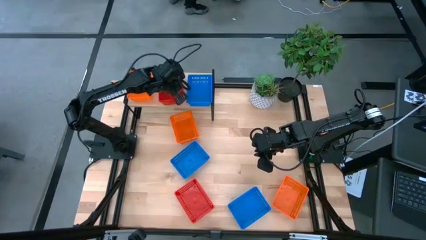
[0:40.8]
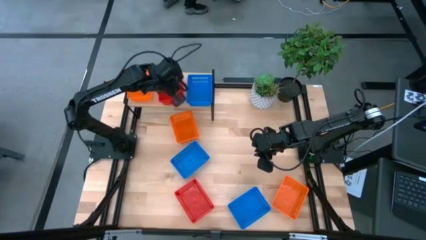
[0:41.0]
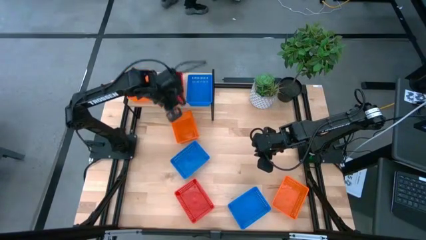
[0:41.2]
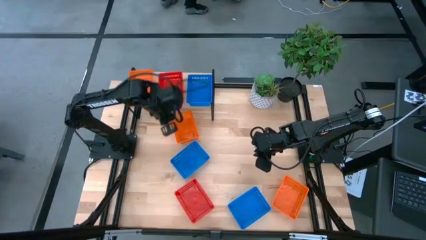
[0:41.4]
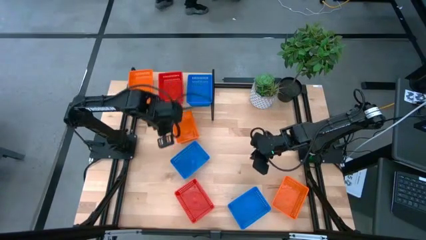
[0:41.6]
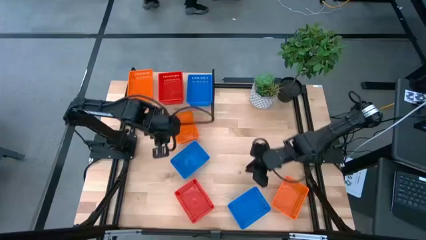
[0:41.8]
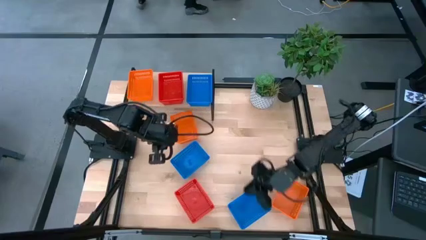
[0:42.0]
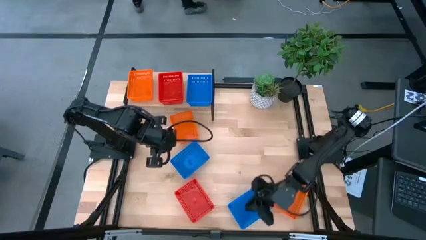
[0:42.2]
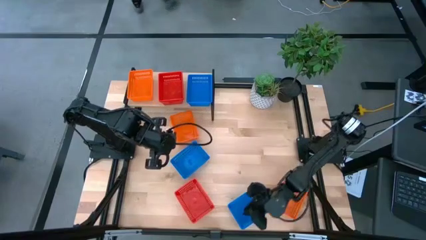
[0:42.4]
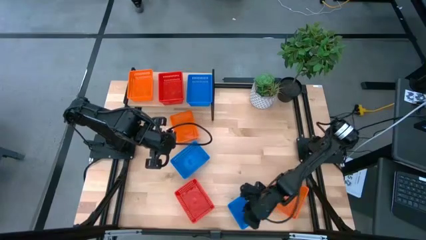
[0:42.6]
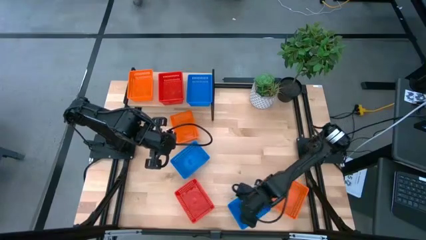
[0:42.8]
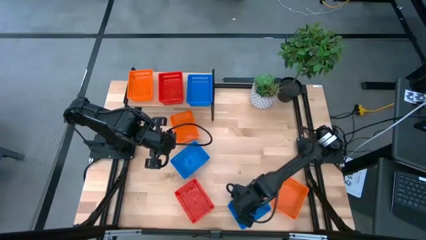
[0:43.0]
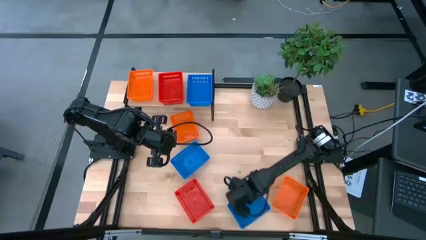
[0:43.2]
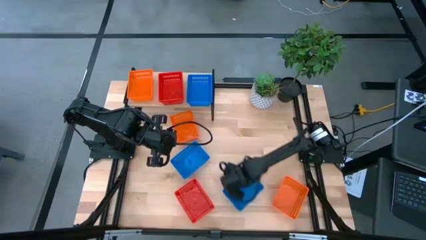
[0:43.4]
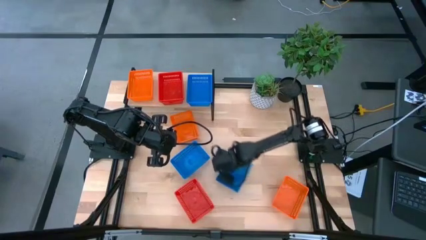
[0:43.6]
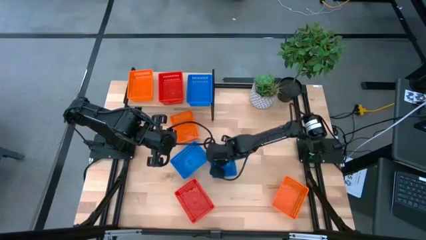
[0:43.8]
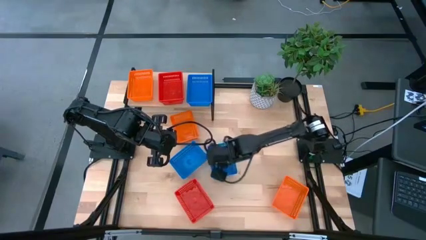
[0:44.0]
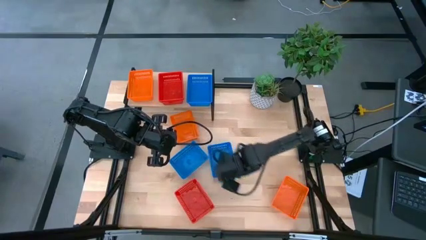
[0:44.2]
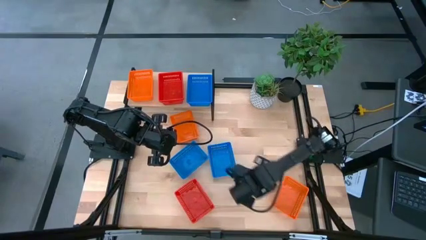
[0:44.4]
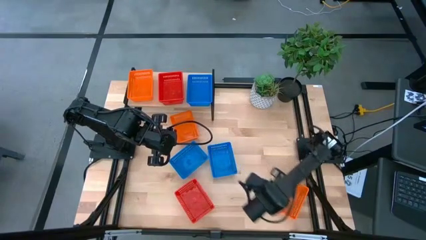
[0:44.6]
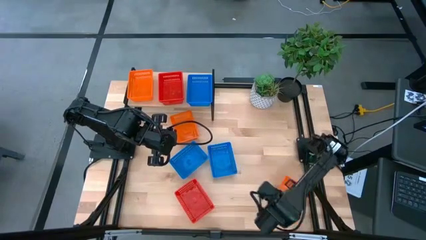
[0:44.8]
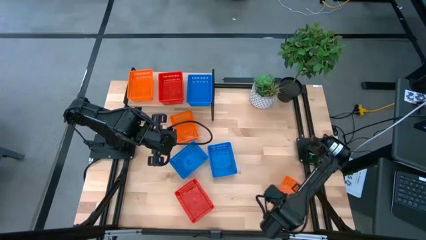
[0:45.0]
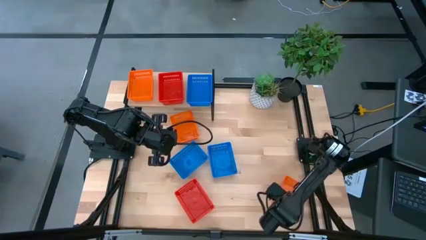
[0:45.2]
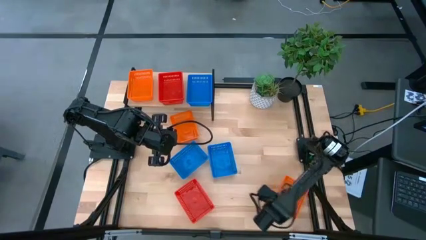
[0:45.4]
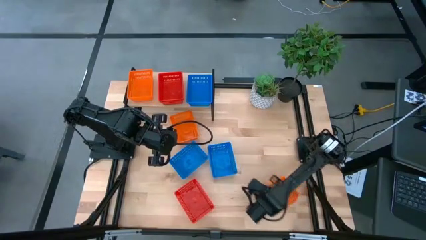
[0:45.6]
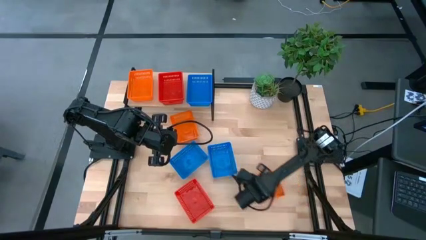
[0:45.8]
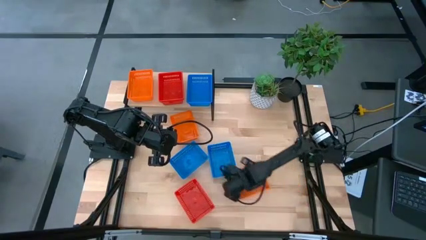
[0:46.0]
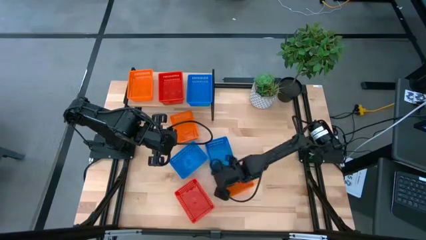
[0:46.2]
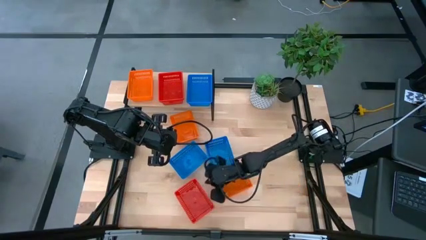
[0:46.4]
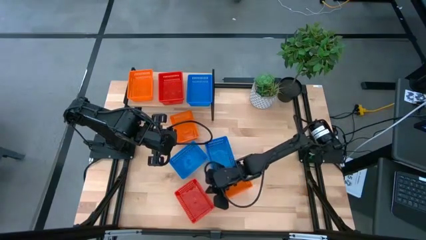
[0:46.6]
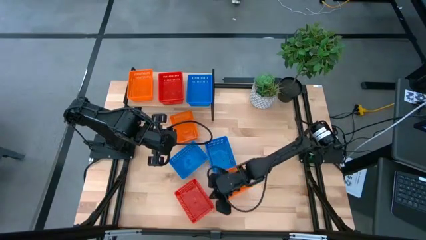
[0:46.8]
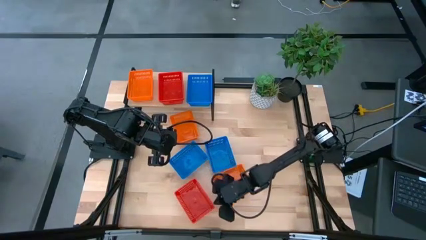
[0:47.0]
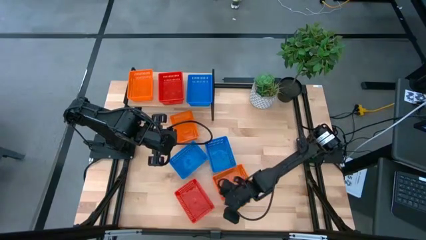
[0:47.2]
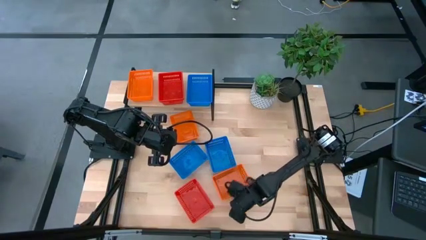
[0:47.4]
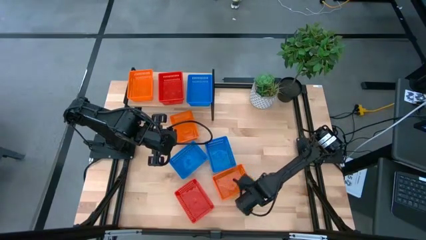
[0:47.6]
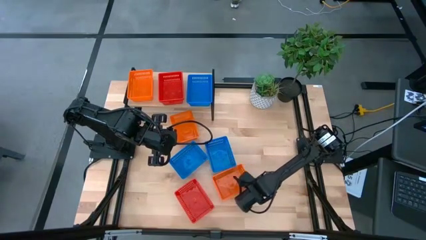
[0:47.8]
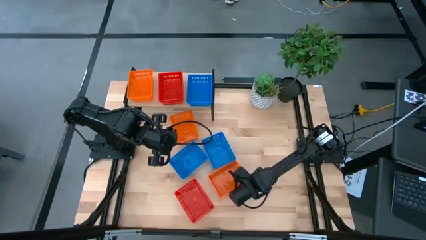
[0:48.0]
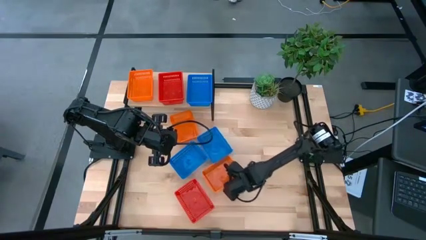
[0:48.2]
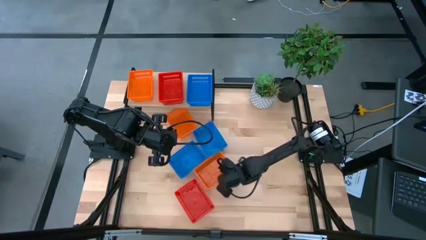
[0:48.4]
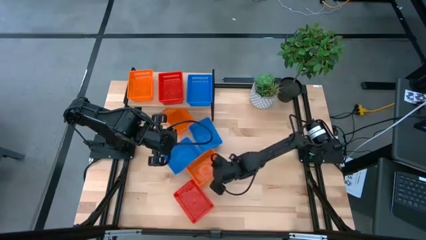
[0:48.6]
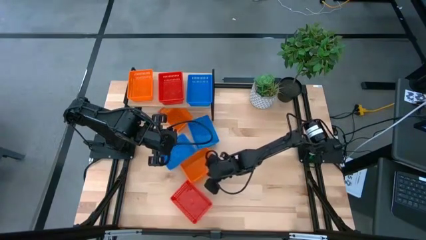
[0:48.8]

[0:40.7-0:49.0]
Task: Stack baskets on shelf by color
Move the bins to the center of the table

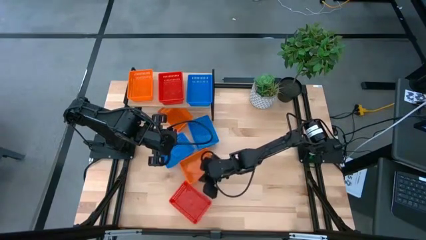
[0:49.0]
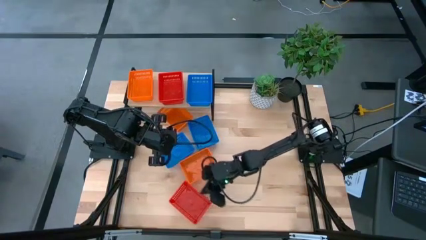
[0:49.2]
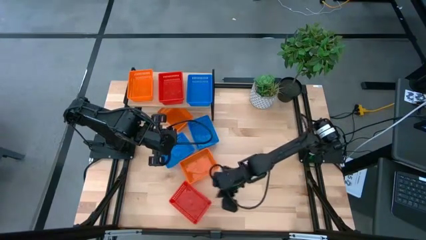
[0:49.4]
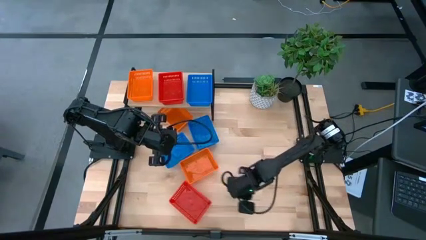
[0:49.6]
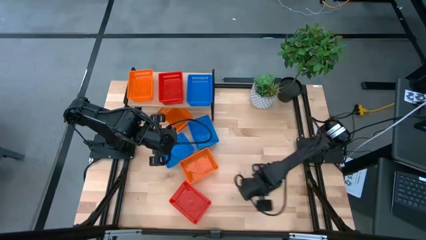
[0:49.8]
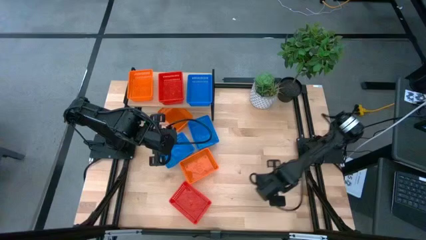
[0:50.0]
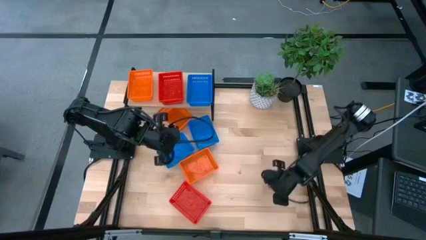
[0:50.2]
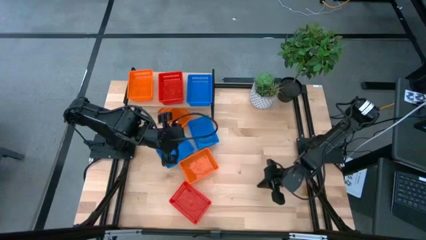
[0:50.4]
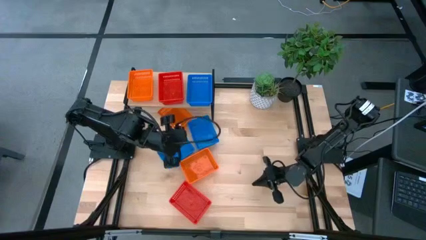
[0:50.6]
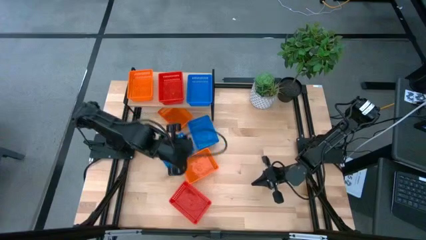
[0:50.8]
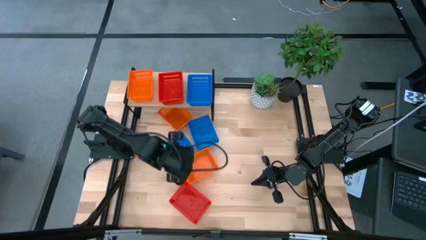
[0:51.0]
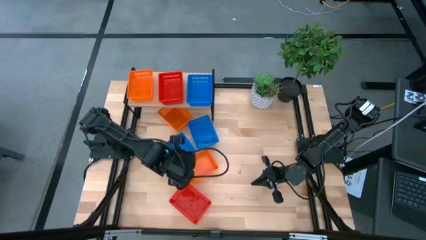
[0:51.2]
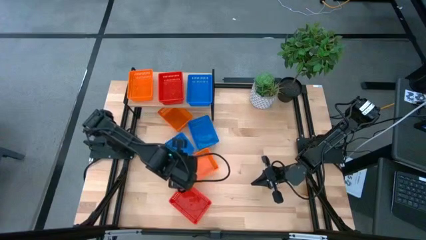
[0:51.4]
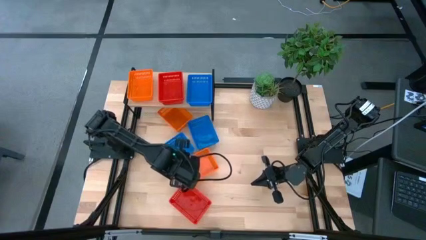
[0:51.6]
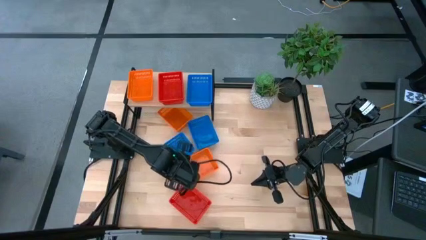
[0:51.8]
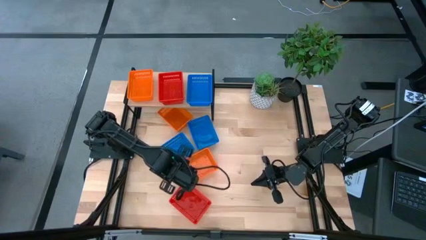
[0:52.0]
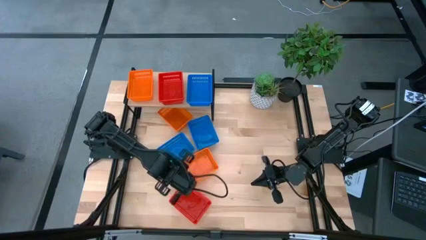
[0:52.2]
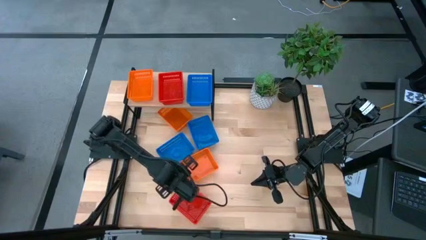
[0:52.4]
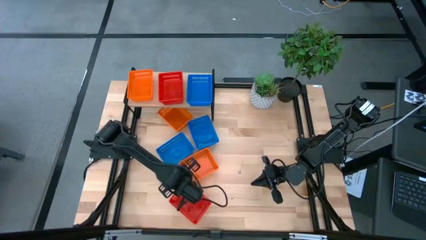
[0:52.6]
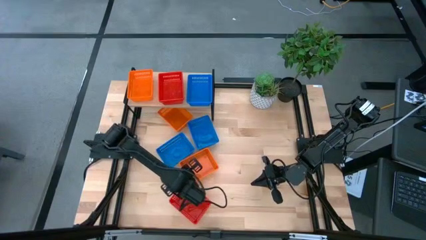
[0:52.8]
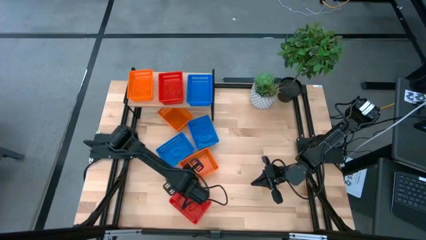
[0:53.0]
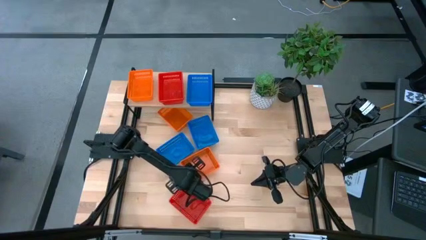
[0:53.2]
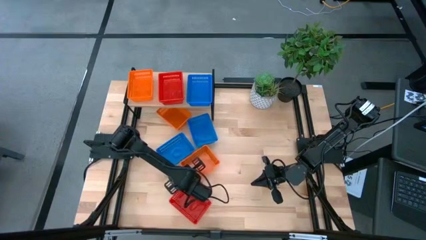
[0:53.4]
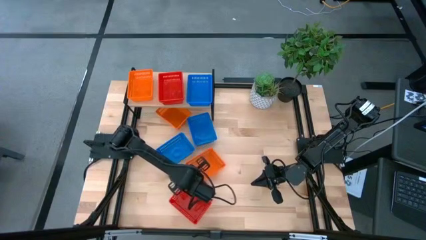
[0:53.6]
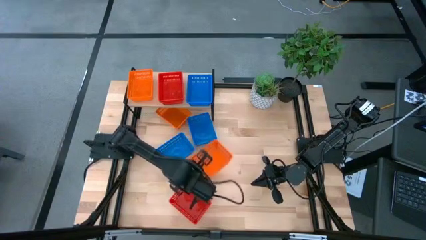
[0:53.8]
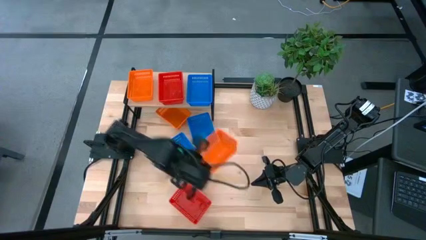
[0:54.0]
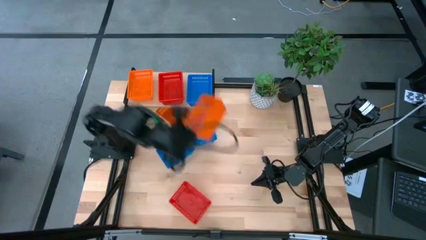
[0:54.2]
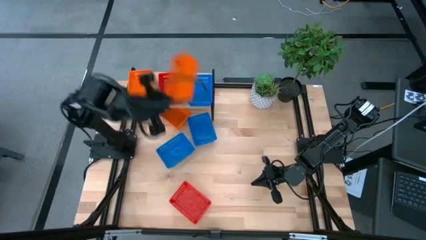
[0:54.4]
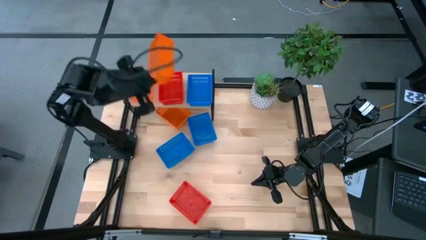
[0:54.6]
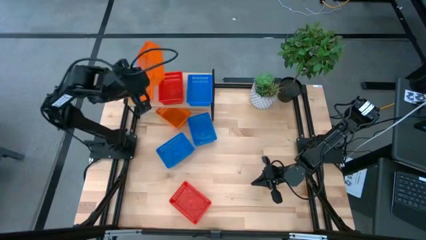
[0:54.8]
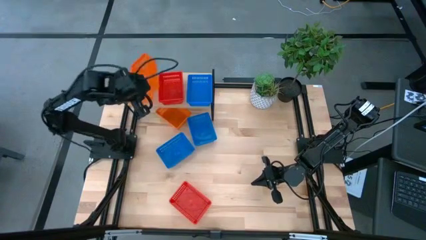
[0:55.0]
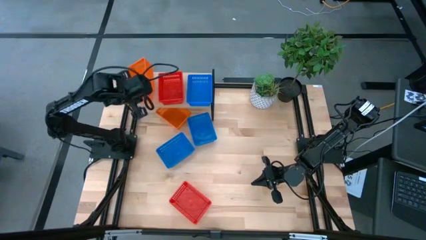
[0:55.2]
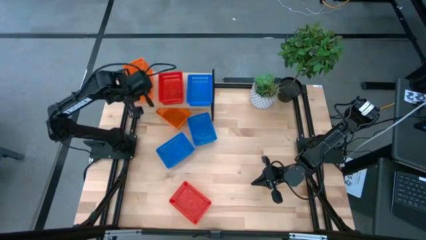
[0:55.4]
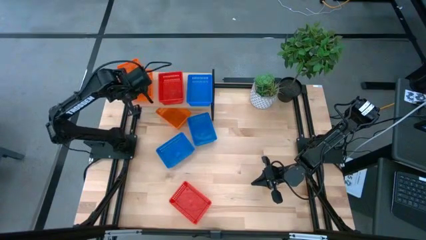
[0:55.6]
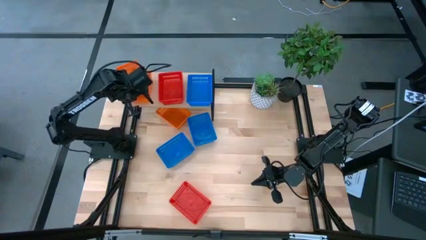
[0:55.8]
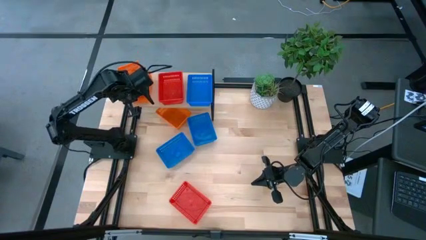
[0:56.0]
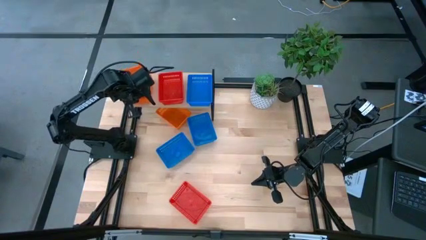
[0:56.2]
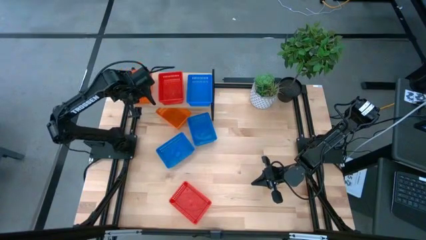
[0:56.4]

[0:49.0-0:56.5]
Stack the bottom orange bin on top of the orange bin on the shelf
